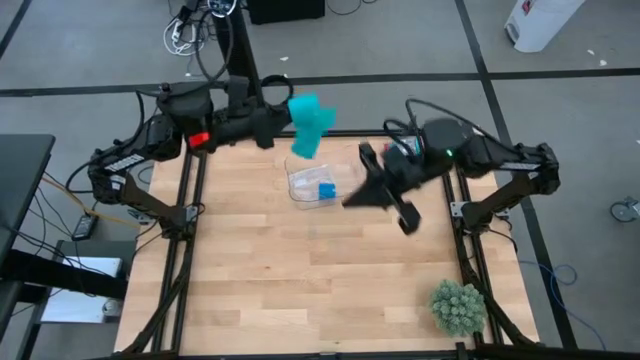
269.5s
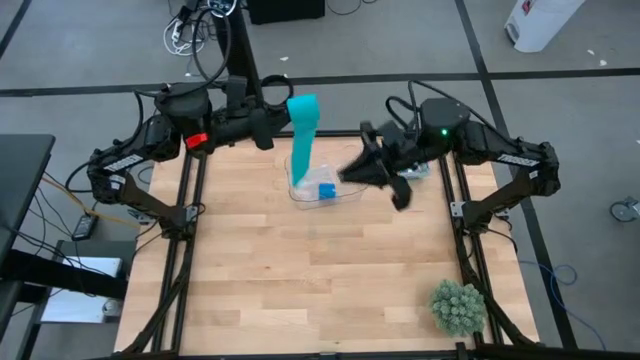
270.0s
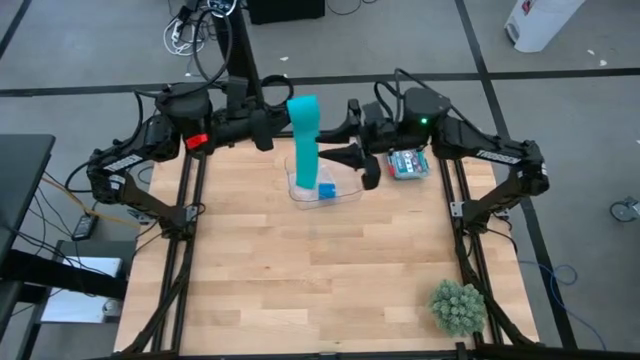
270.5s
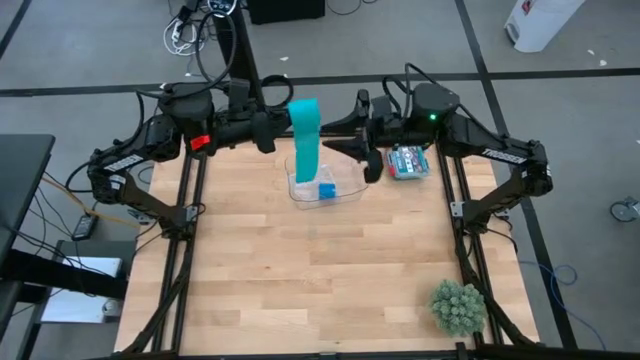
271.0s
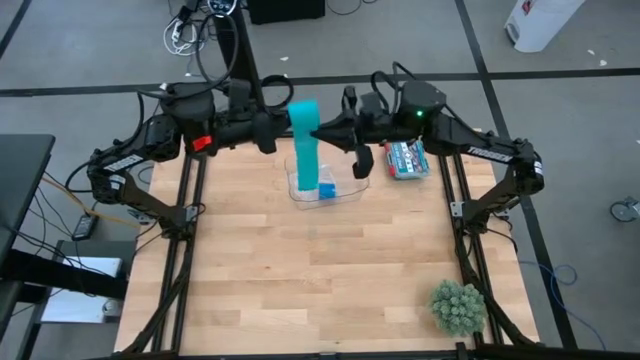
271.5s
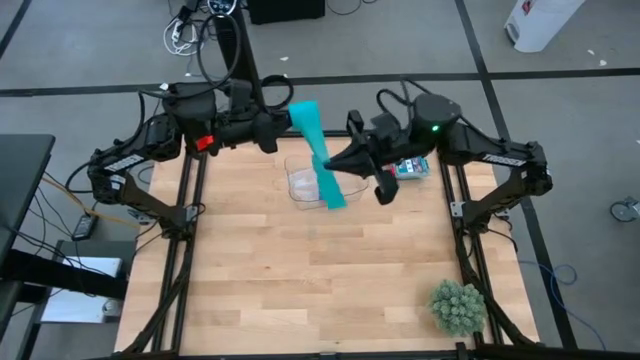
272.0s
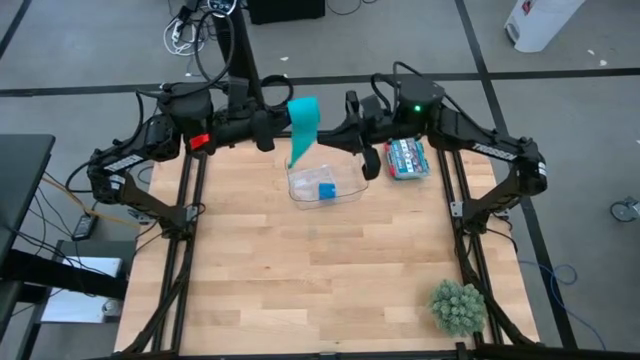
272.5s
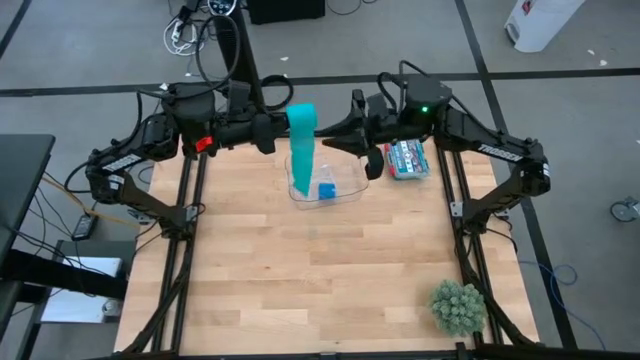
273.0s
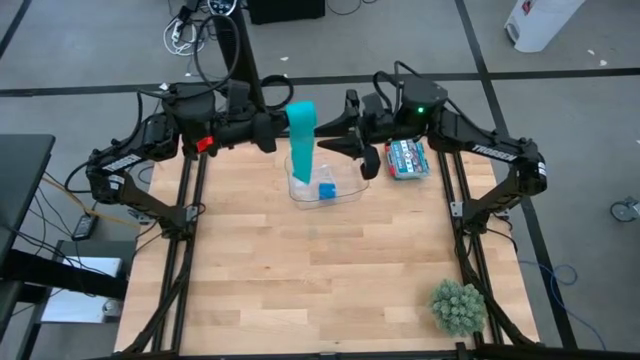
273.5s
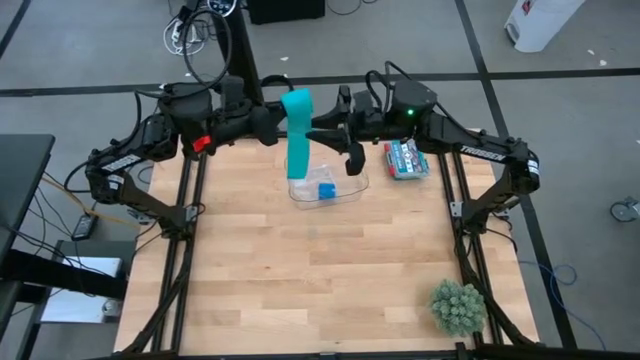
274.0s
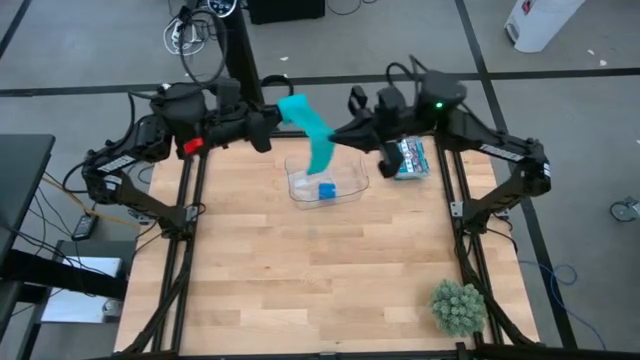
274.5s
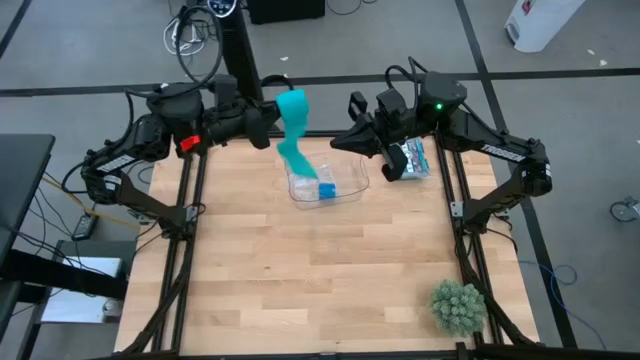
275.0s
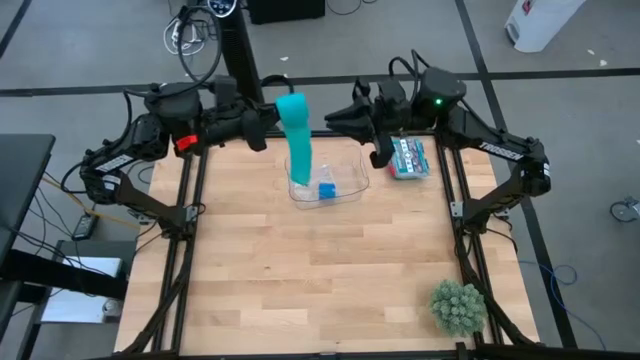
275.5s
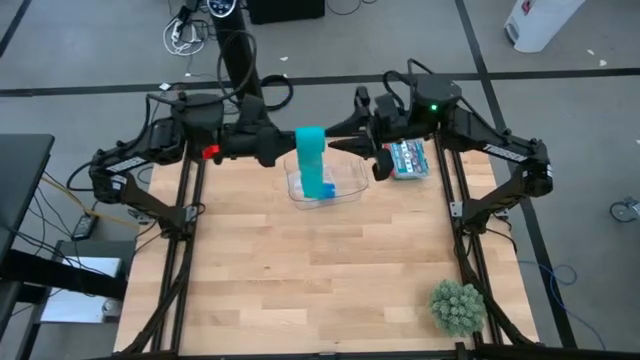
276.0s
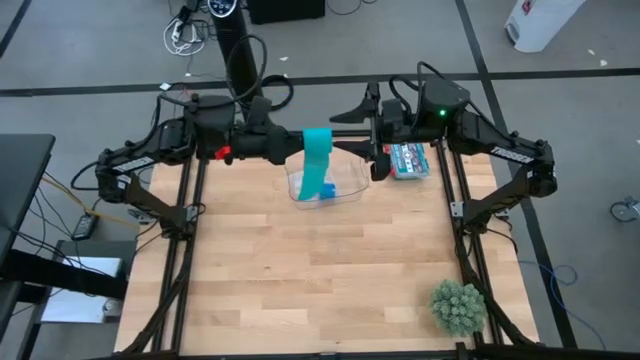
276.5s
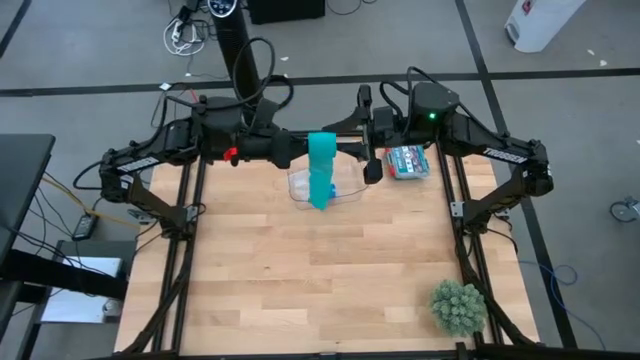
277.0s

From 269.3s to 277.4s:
Task: Roll bandage
Roll the sky blue bandage

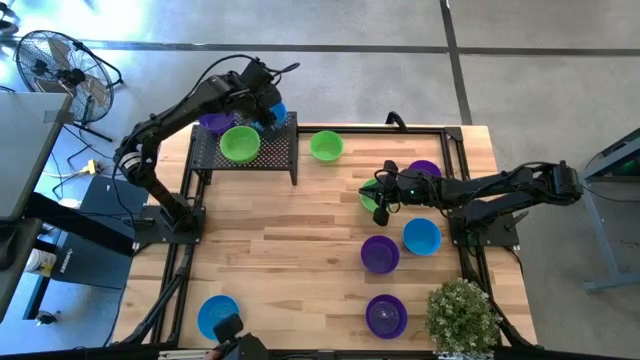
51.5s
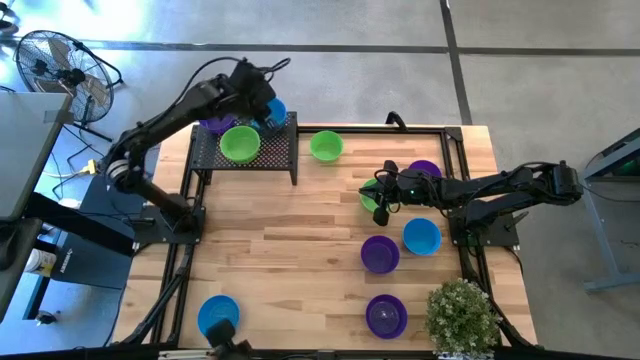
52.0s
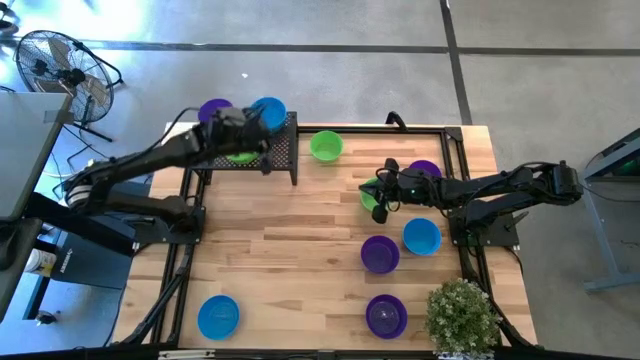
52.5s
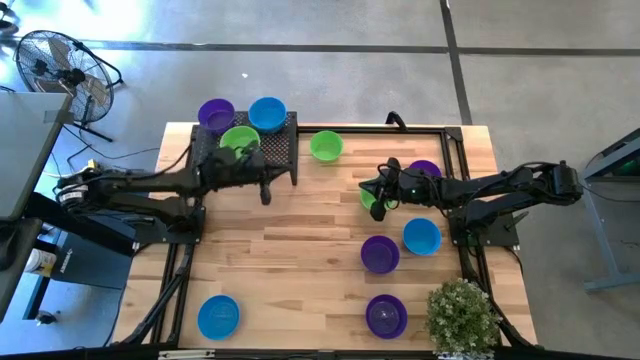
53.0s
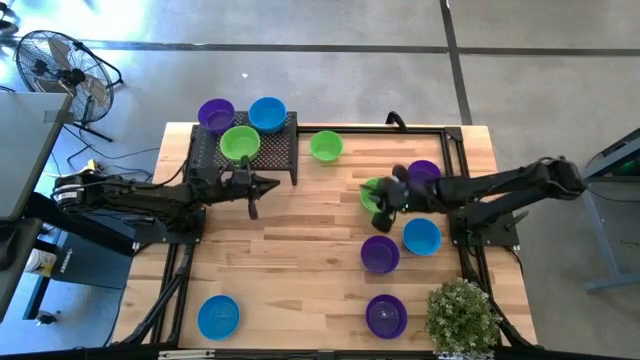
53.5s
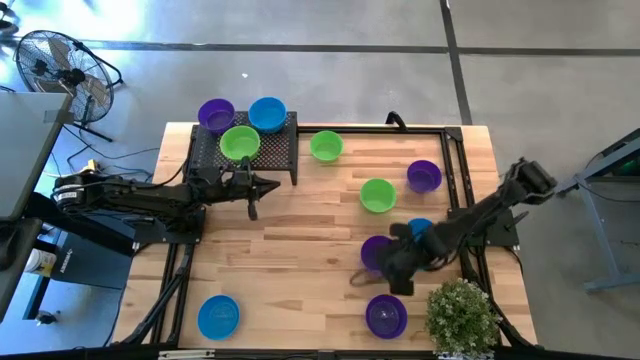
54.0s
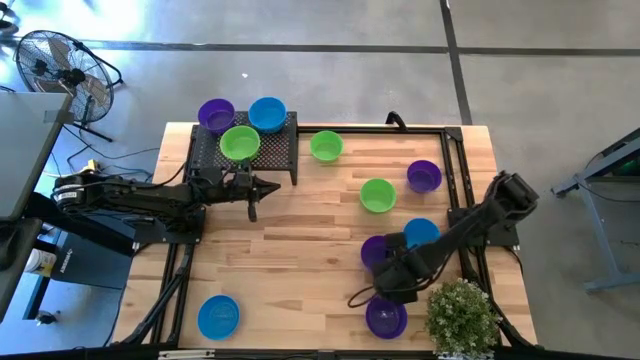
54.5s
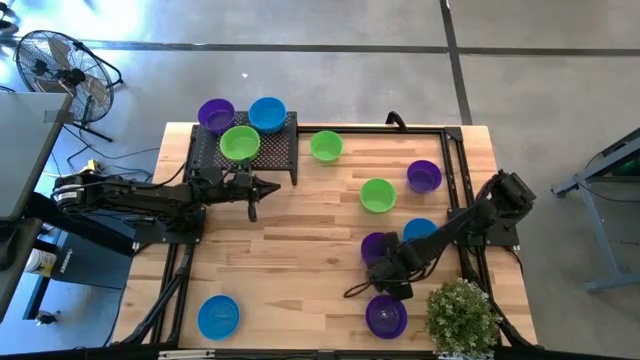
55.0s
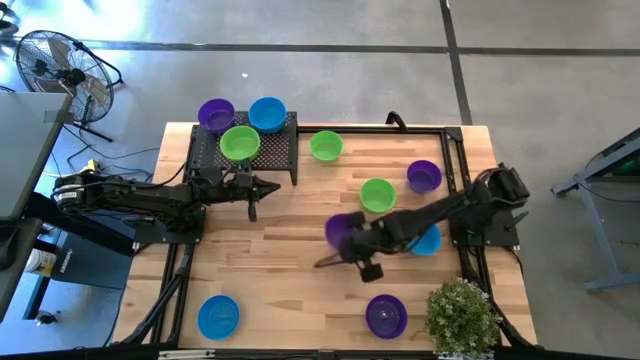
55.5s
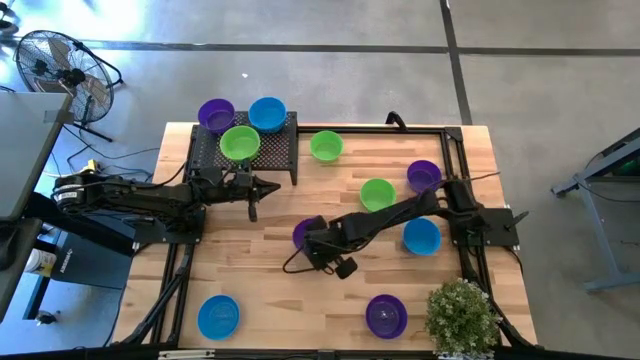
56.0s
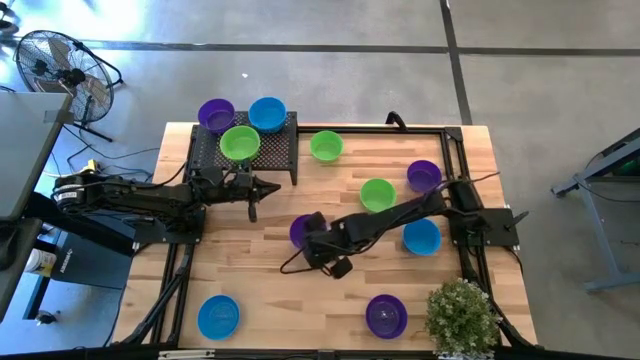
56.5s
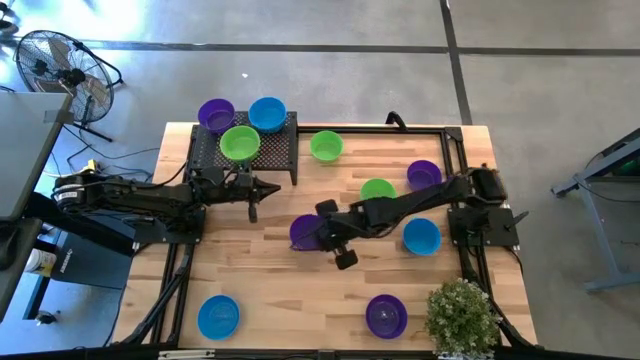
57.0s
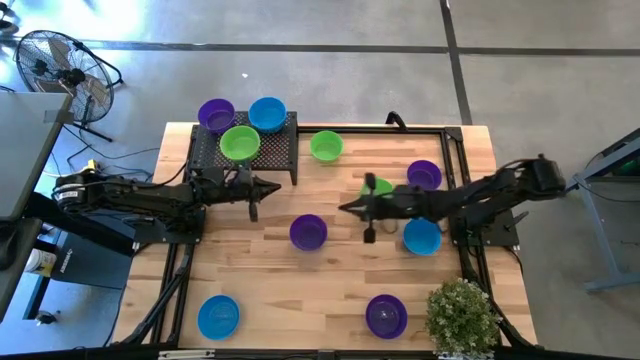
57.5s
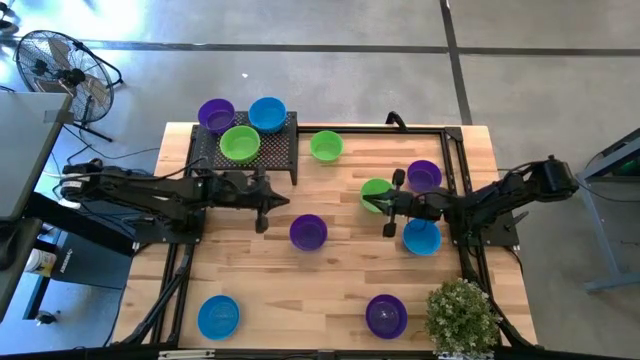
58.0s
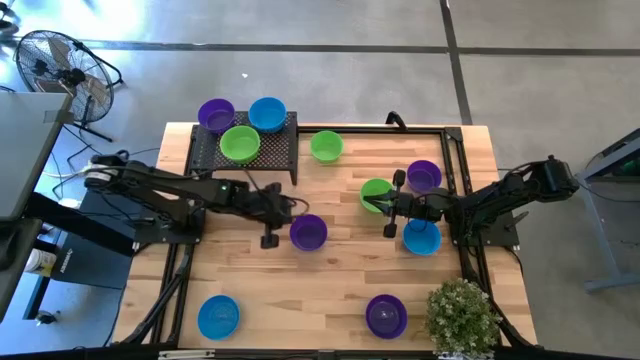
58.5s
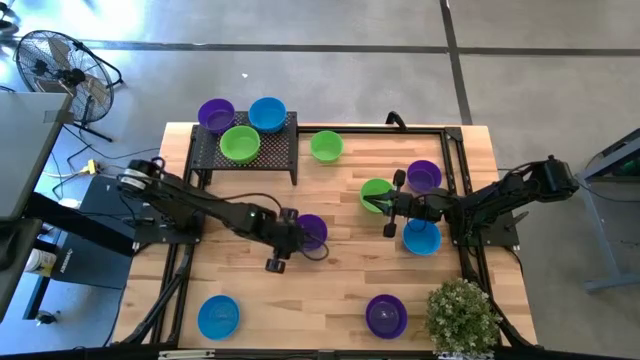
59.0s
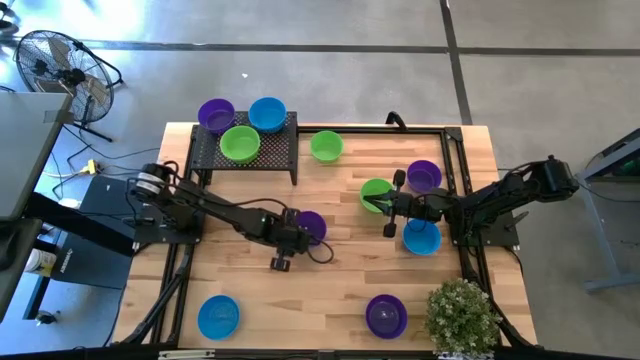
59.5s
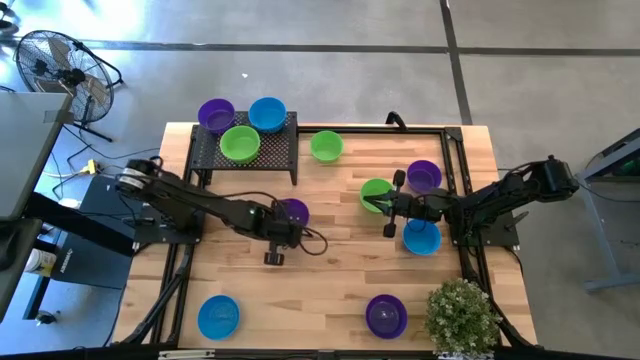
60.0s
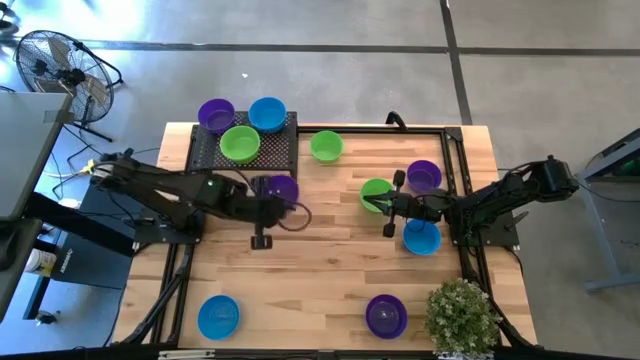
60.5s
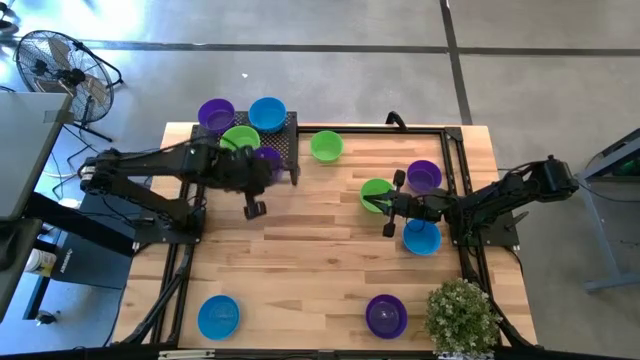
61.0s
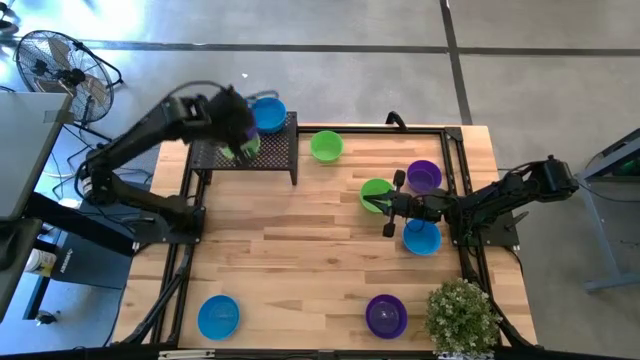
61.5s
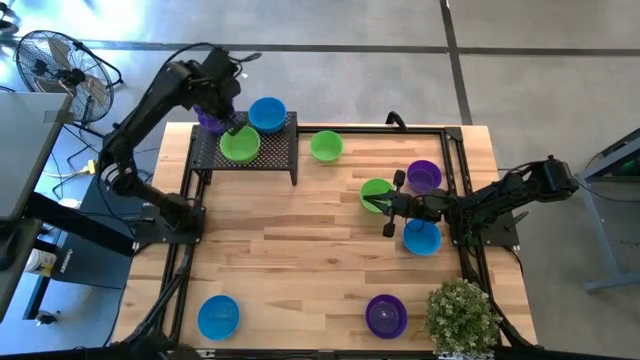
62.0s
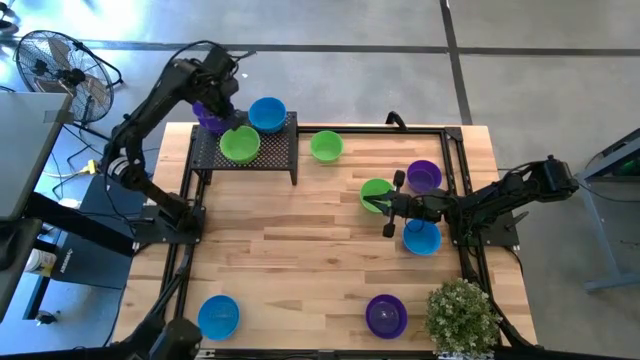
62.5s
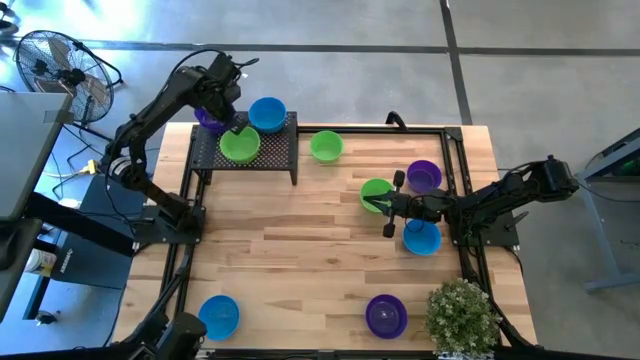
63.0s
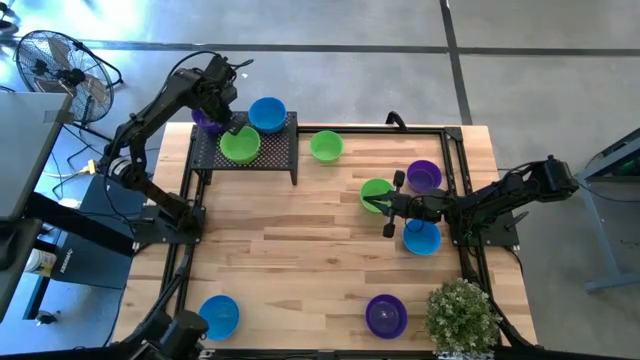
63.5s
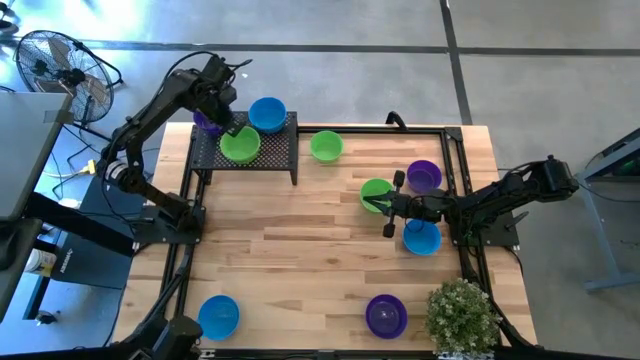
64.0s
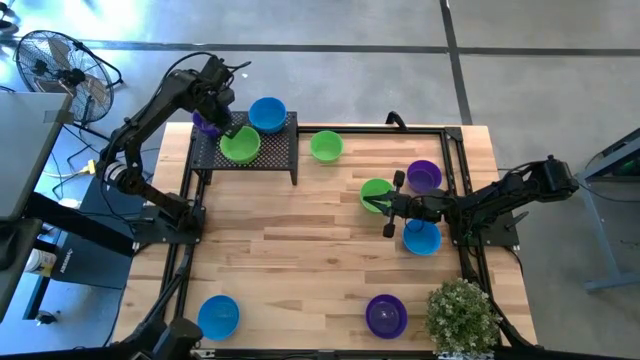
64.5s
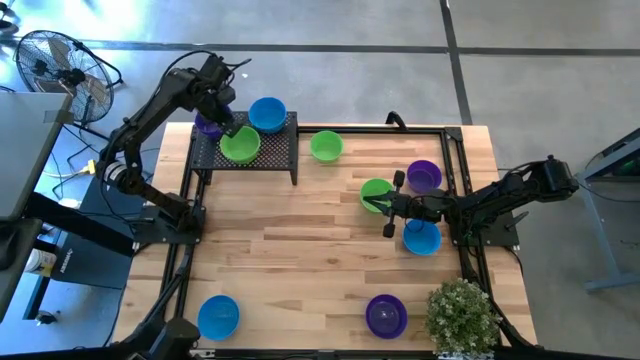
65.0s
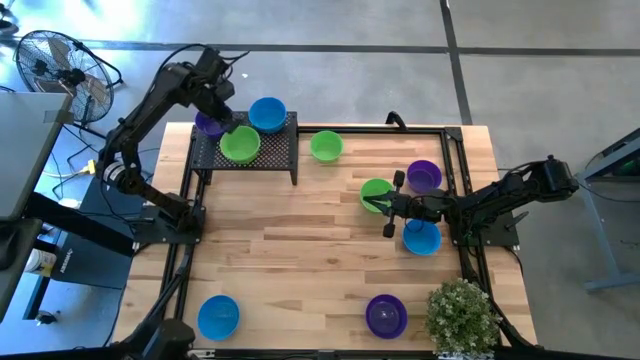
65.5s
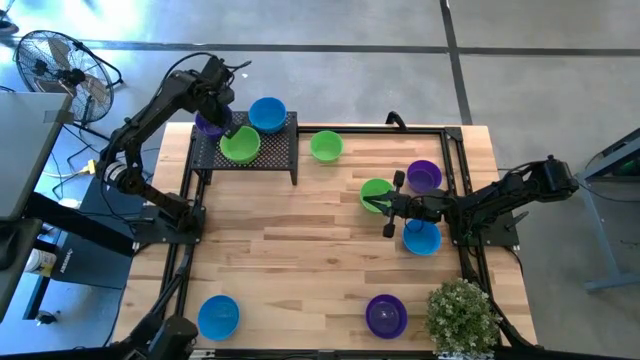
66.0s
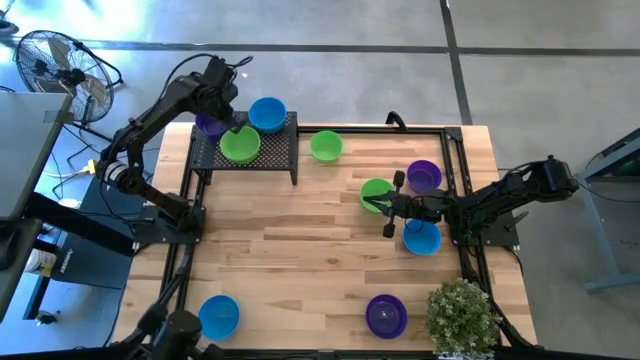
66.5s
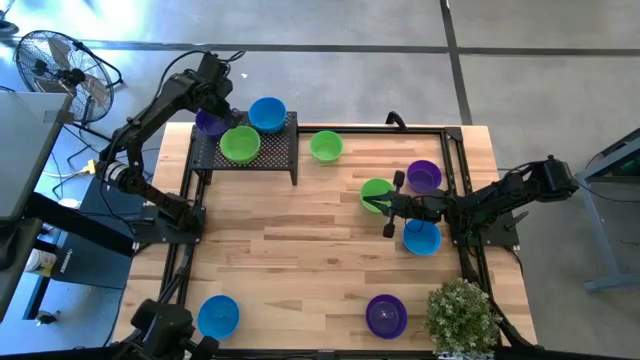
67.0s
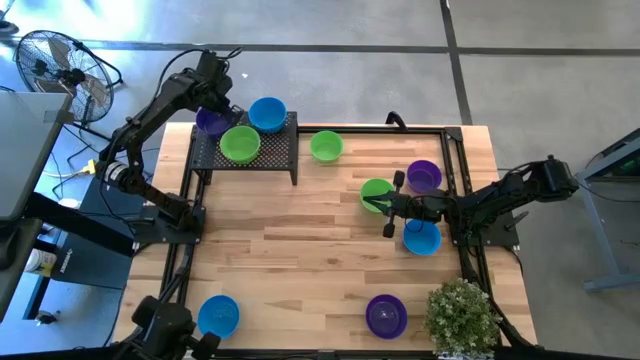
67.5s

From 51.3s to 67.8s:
Task: Pick & Place Mini bowls
Stack the purple bowl on top of the purple bowl on the shelf
